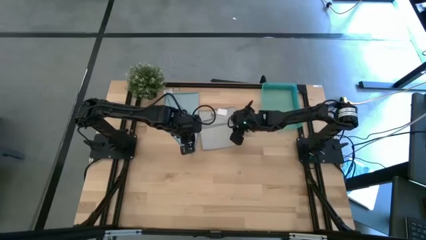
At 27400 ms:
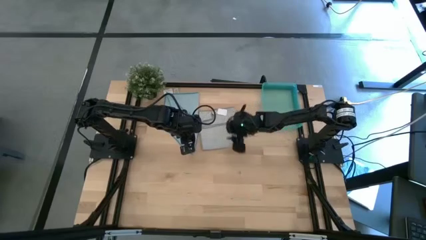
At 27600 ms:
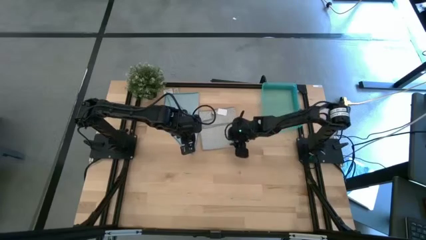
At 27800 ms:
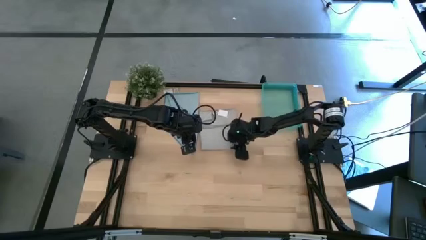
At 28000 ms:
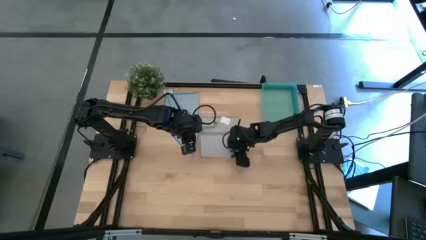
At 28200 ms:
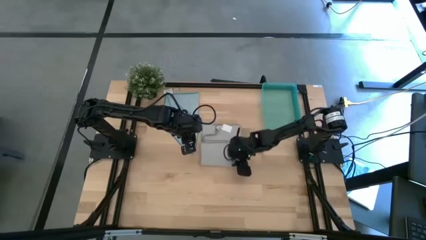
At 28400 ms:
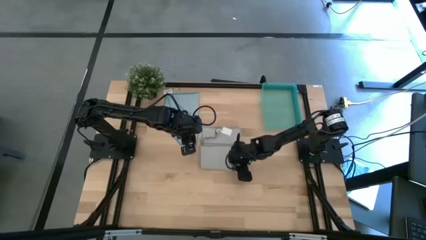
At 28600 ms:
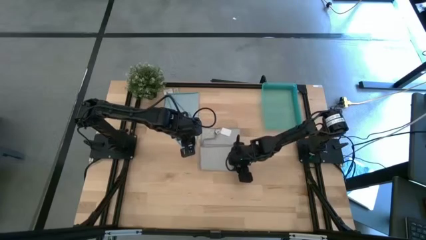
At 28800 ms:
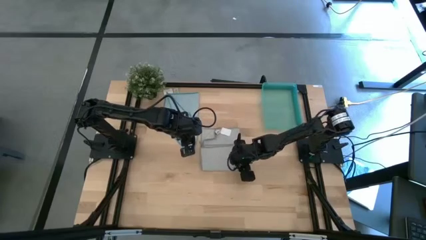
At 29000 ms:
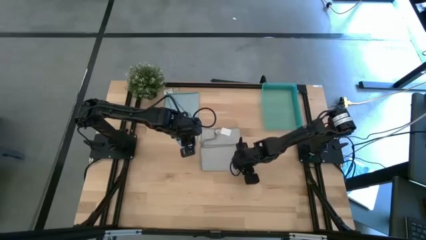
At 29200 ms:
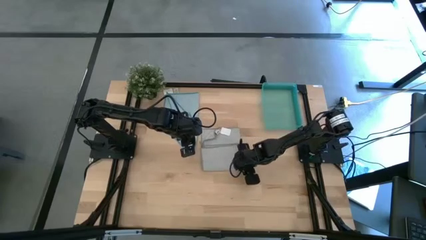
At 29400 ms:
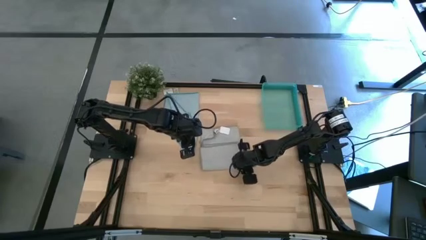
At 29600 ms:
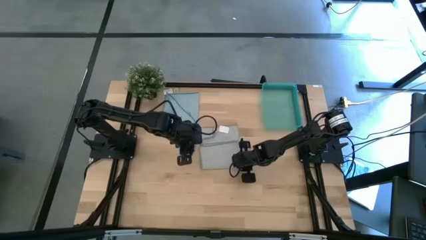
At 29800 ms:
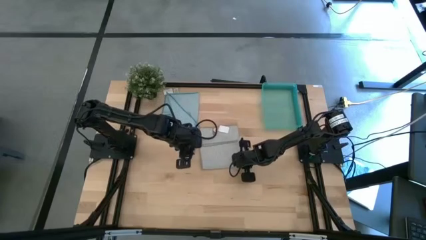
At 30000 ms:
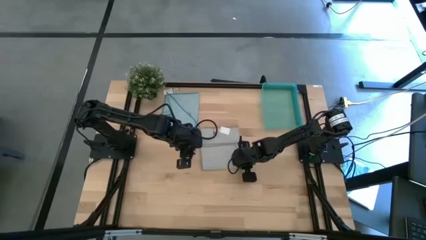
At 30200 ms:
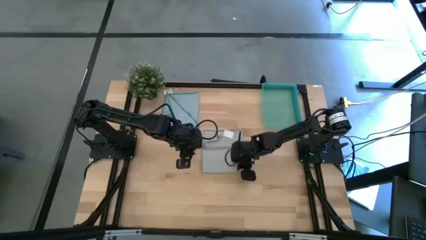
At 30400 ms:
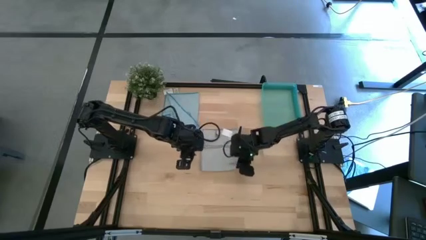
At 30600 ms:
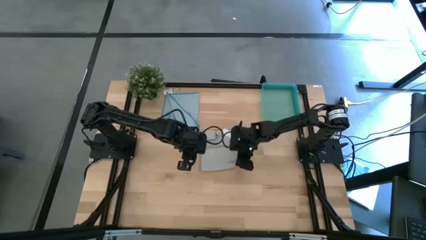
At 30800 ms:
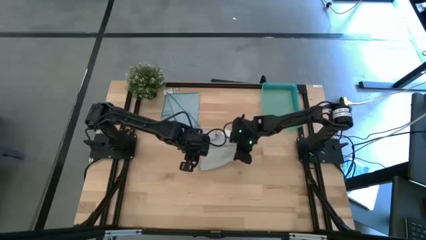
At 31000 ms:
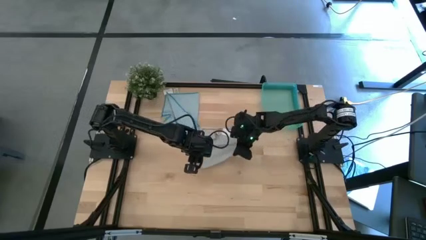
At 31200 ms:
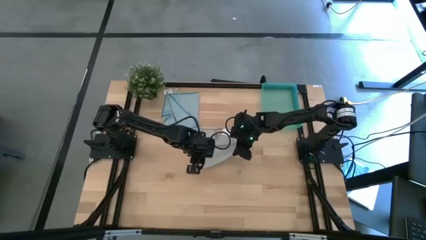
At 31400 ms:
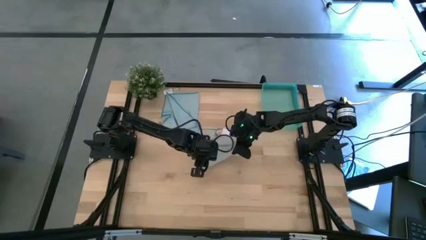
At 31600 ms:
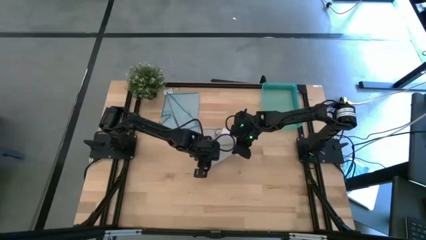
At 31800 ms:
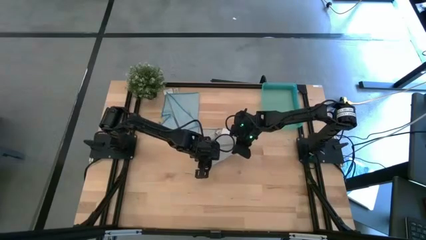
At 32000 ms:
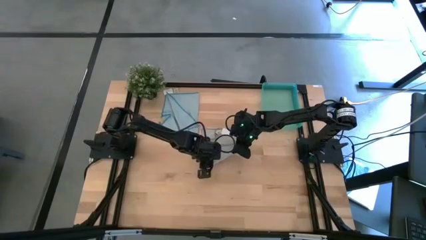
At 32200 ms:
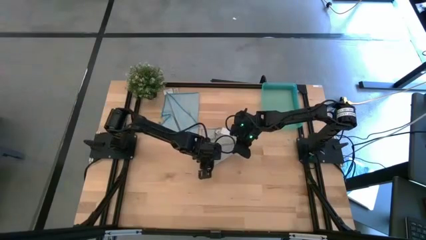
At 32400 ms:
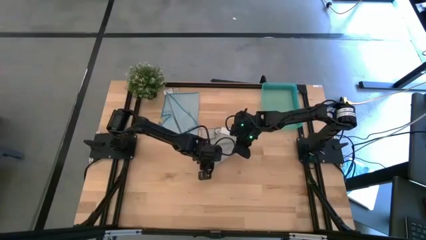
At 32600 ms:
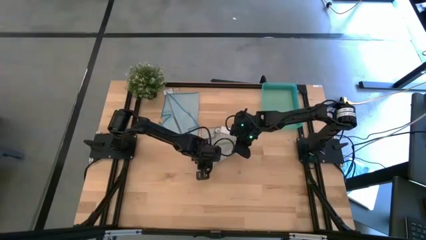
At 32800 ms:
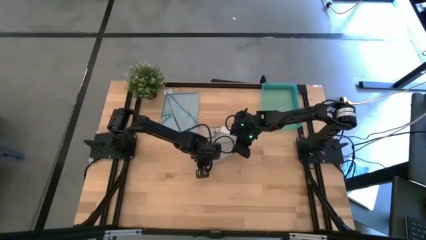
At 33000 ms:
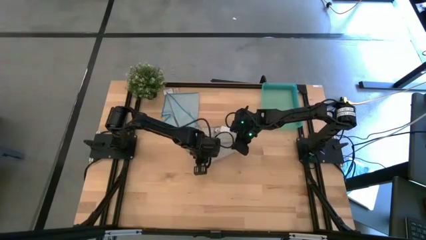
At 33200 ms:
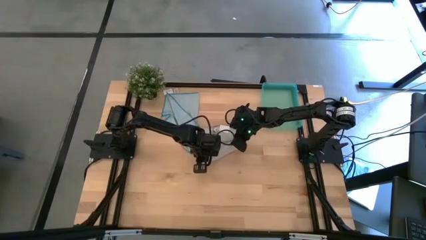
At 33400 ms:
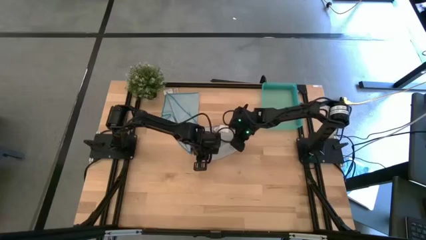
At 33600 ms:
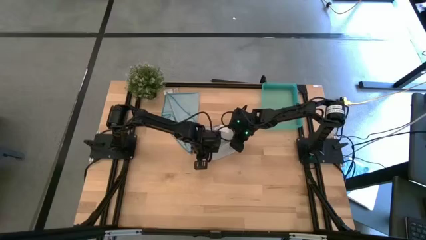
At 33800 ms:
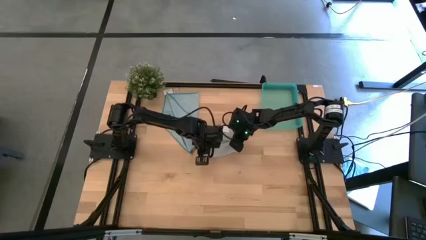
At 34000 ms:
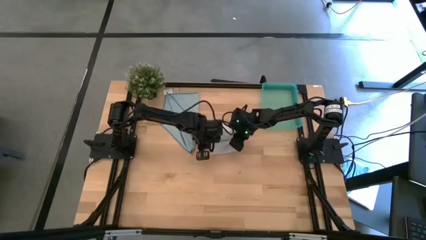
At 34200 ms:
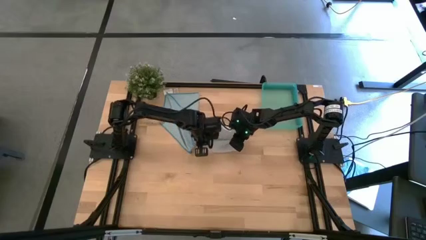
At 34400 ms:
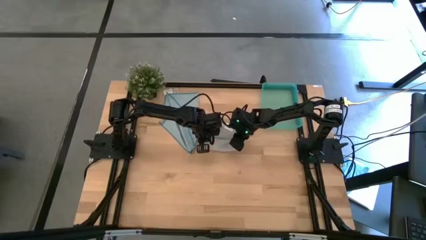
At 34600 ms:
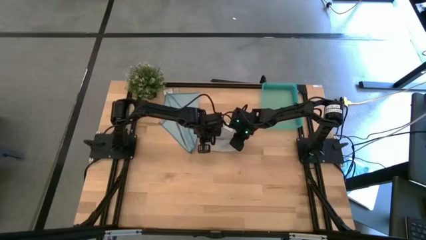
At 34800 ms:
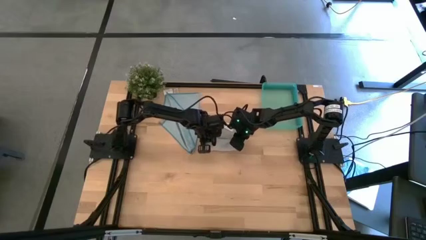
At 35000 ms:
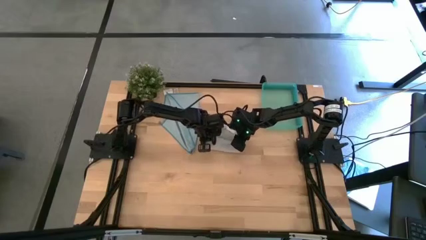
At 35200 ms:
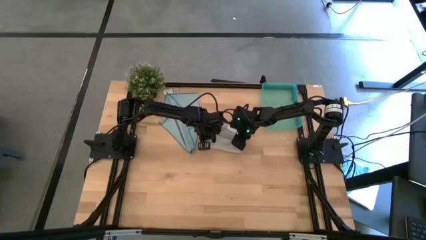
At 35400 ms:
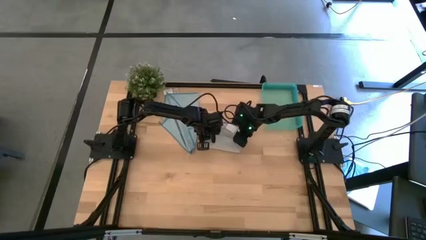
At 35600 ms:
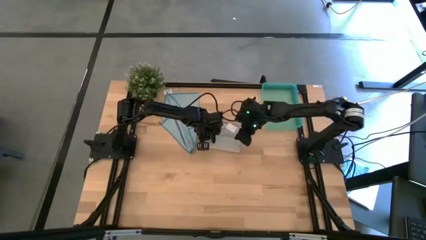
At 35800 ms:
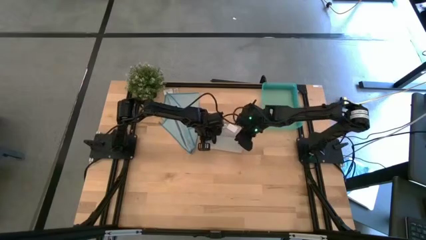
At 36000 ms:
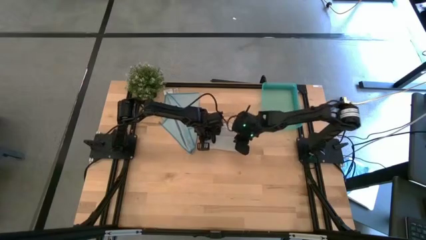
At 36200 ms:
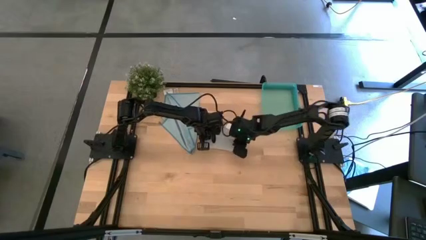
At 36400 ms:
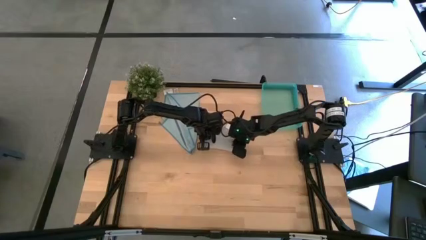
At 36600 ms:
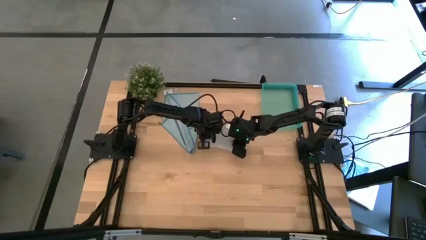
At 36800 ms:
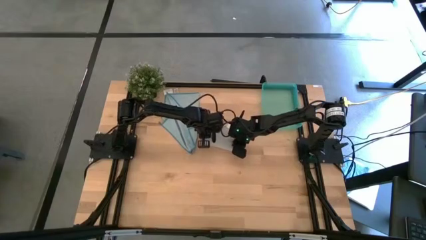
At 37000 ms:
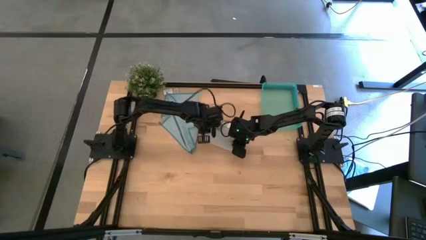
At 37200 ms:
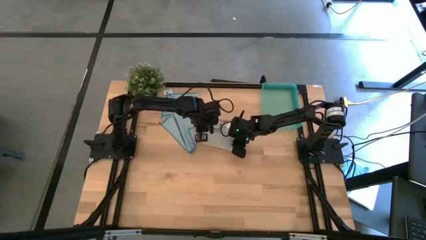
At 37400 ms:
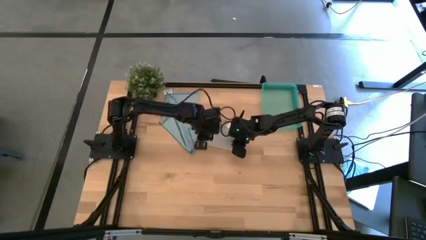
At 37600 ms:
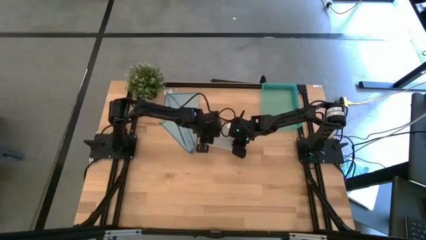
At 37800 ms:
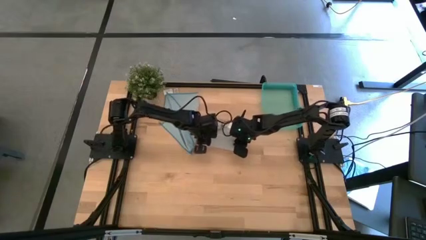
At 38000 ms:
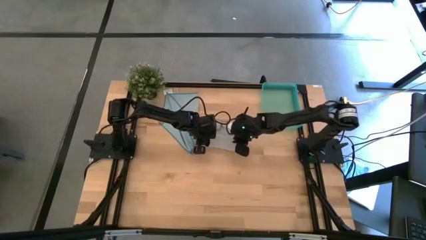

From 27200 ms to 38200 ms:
Task: Roll microfiber towels into tight, uniform cylinder then place into a basket
Roll the gray towel
